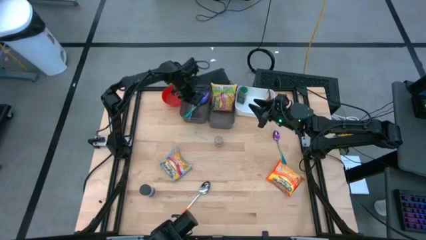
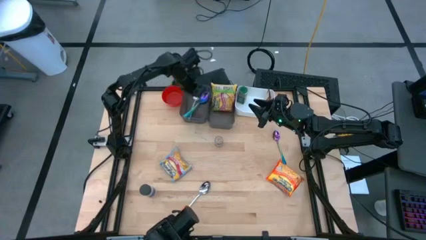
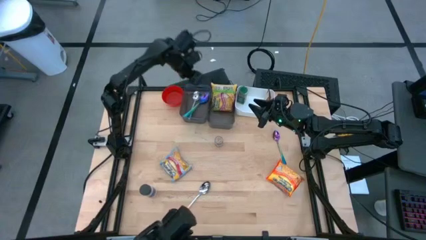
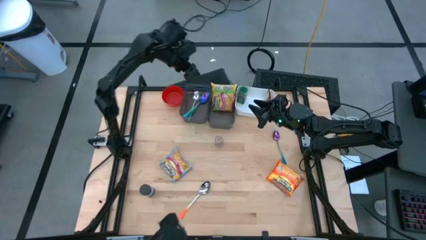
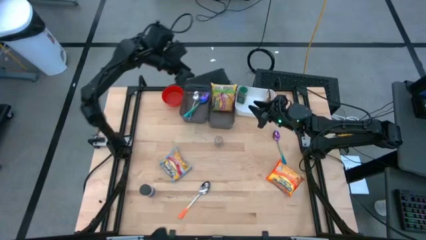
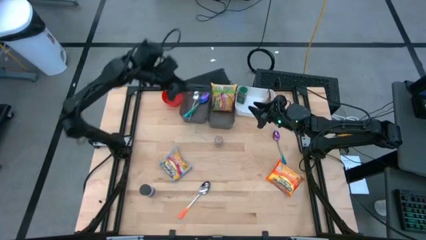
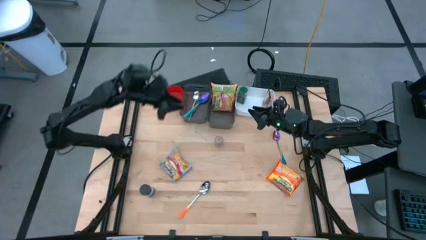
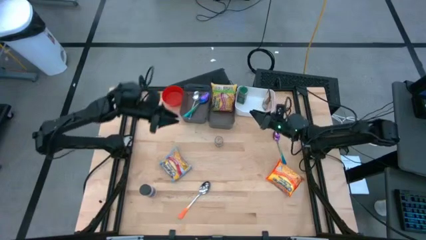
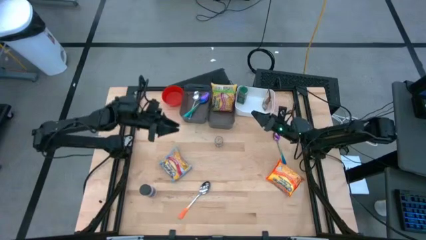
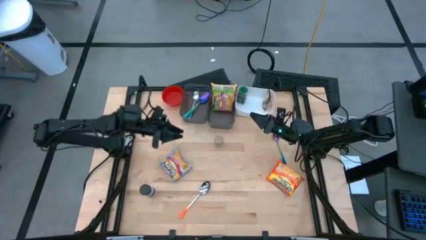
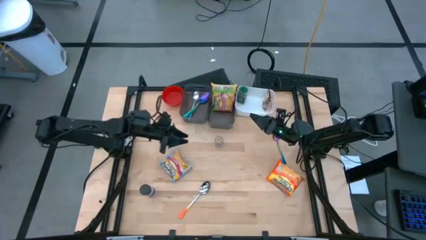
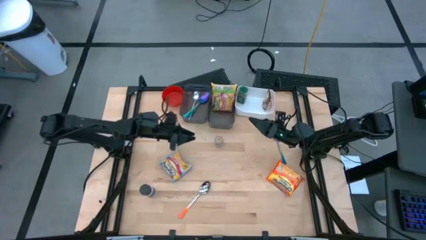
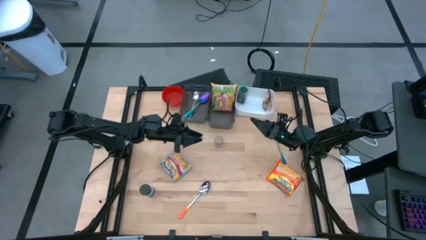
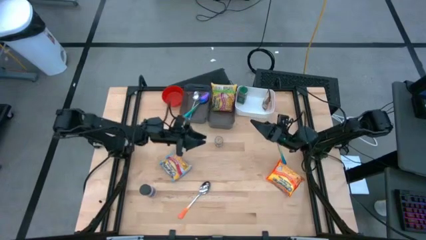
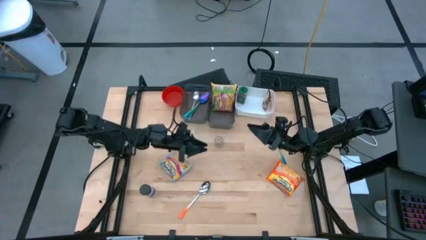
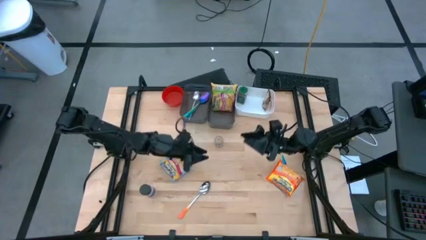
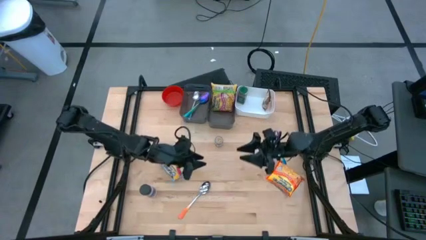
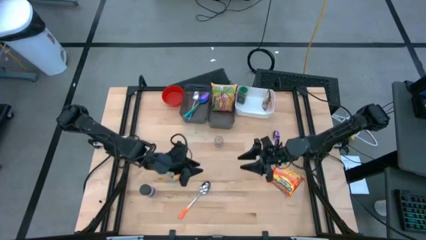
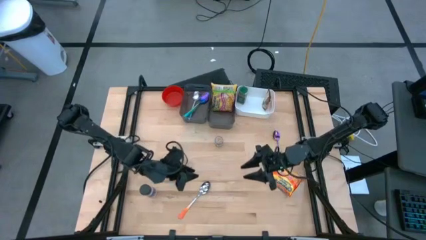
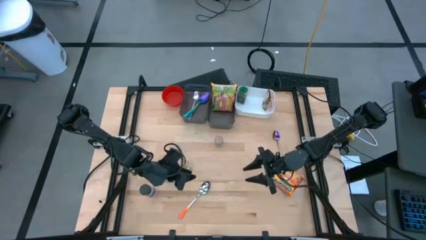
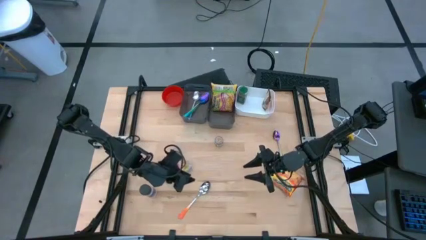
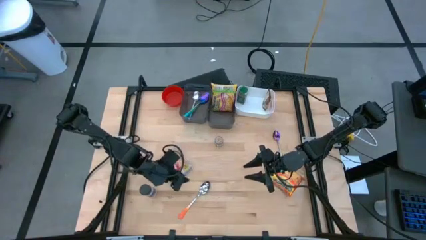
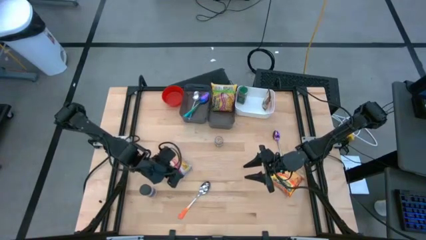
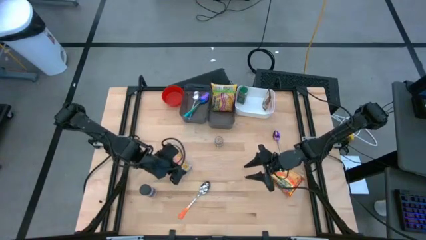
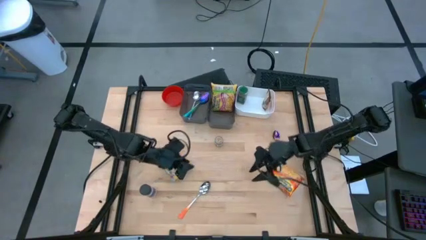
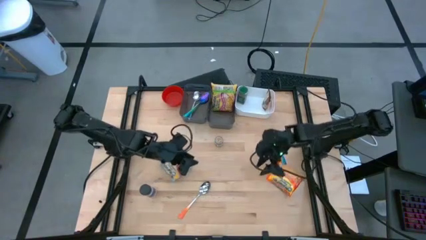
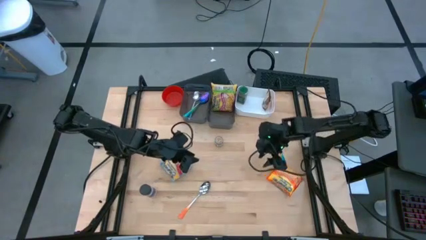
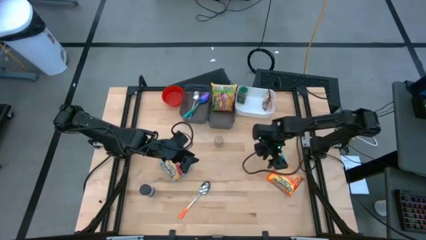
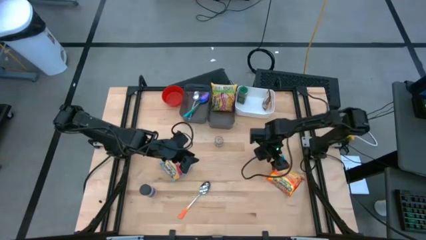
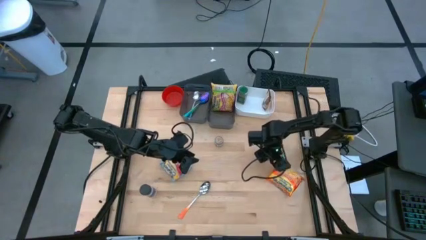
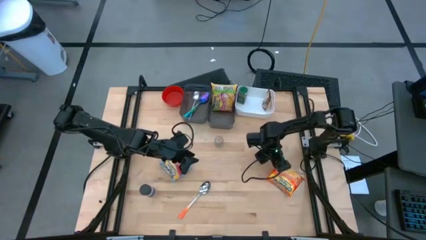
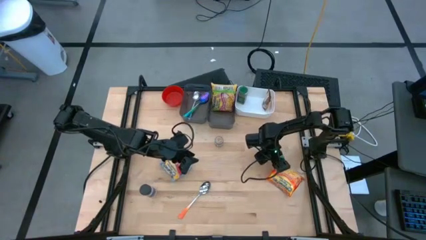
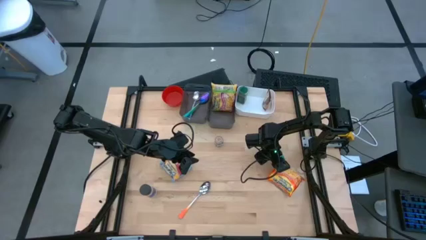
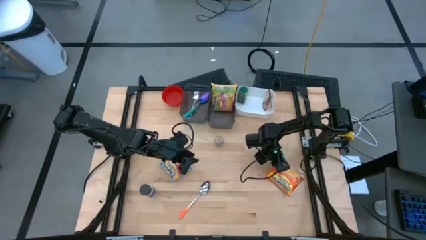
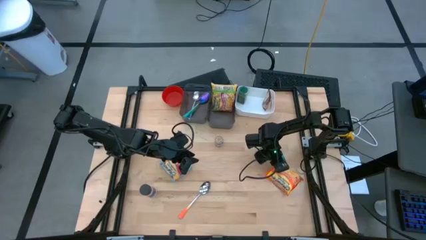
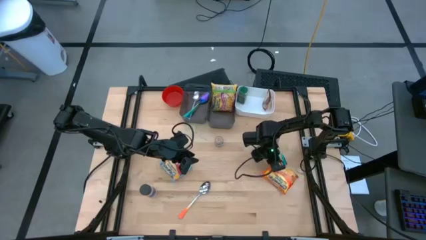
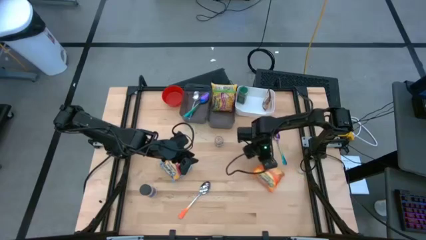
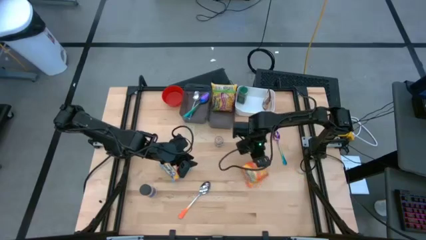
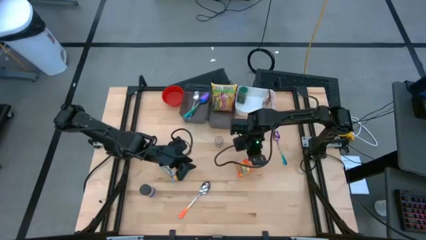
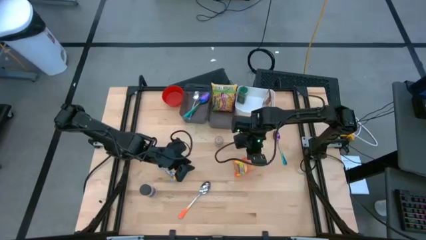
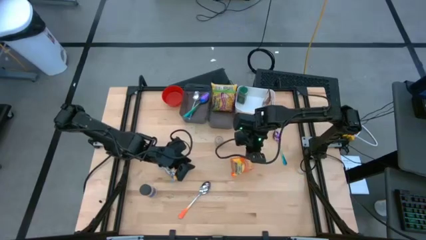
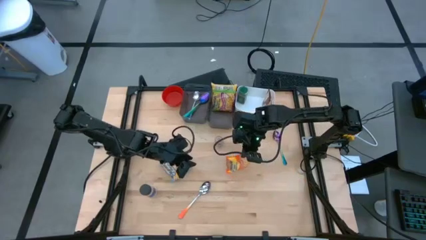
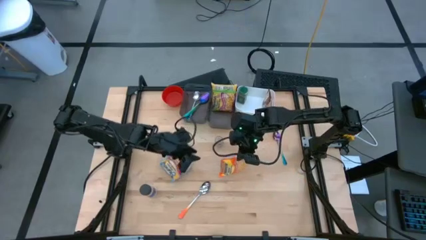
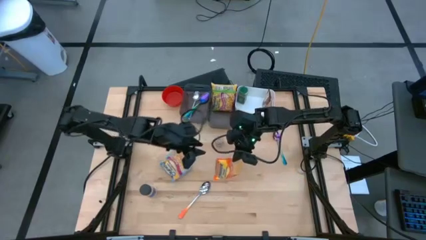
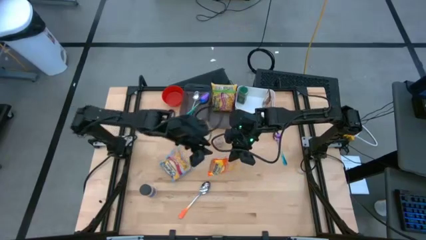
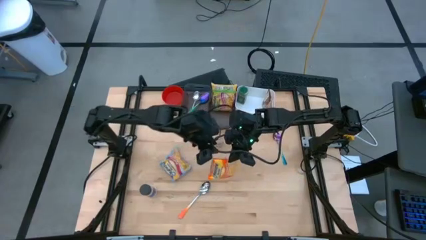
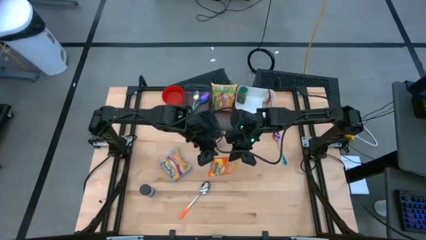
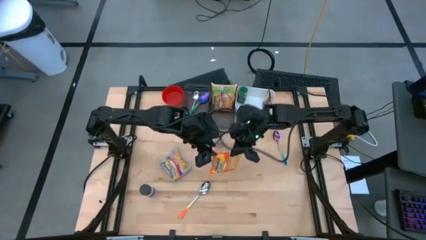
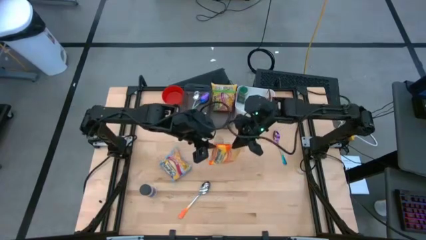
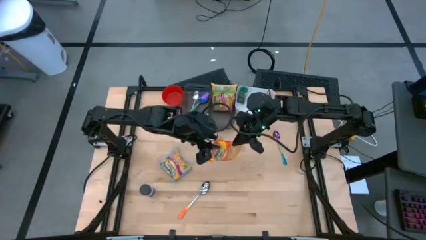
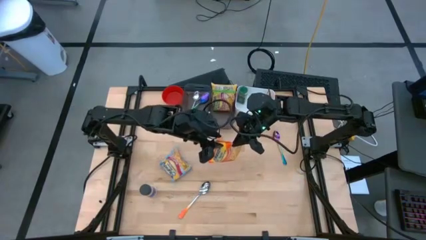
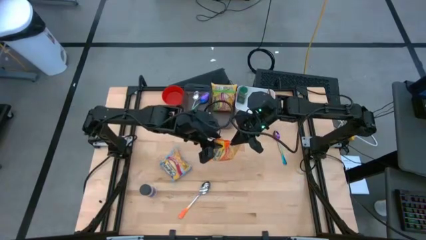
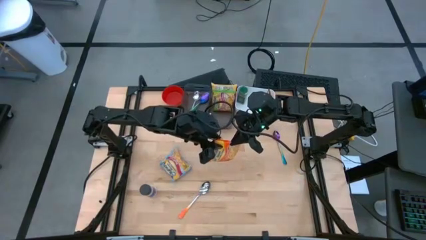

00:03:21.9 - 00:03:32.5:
Task: Pick & Place Food Item
Put the orange noodle pack into the right black bin

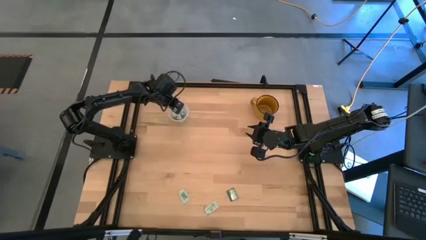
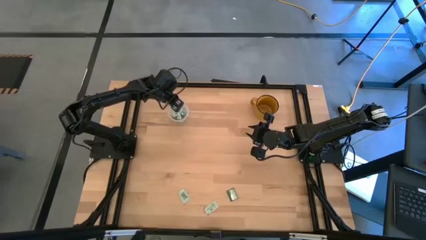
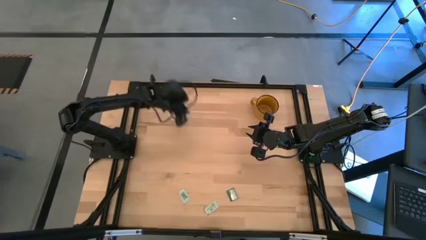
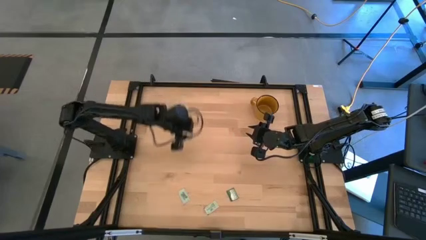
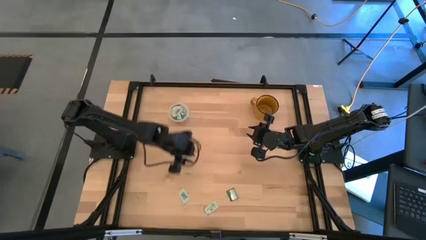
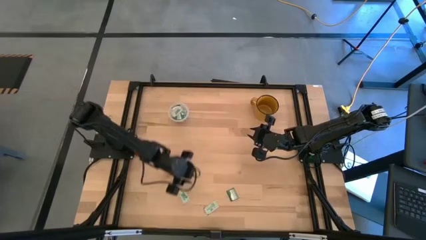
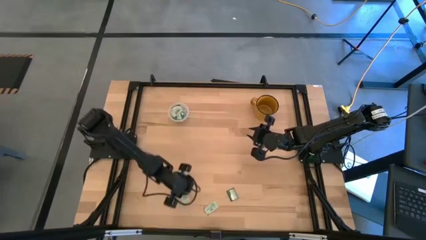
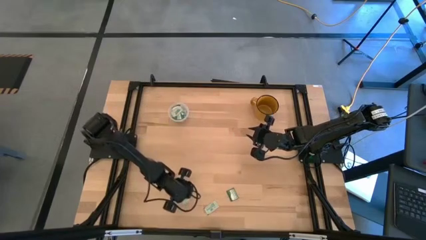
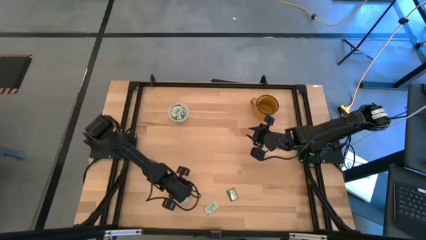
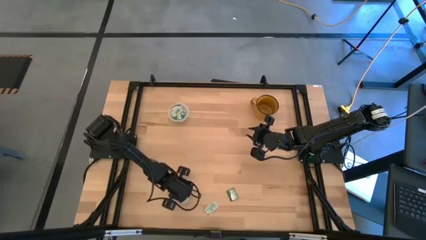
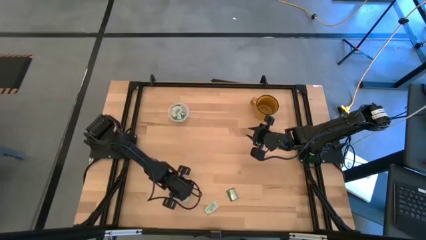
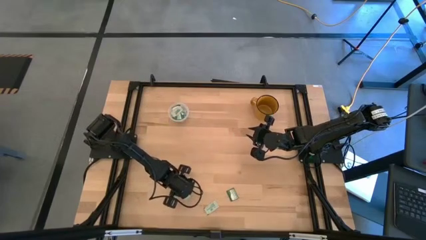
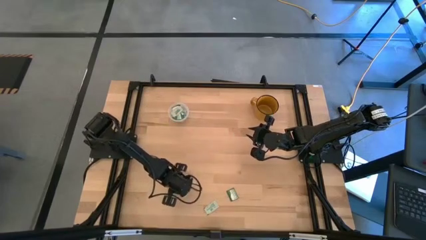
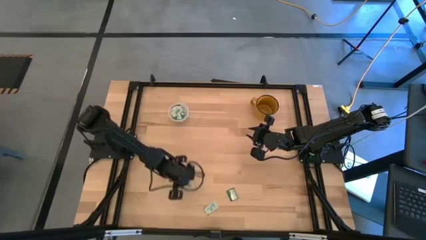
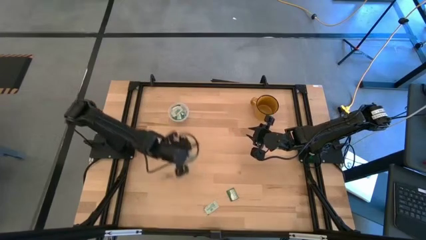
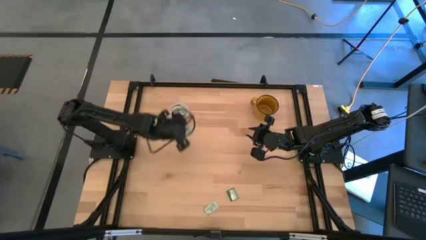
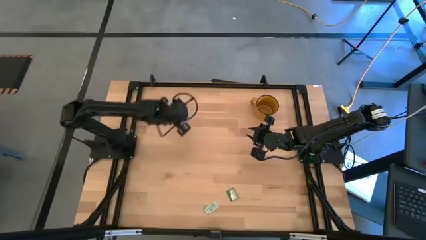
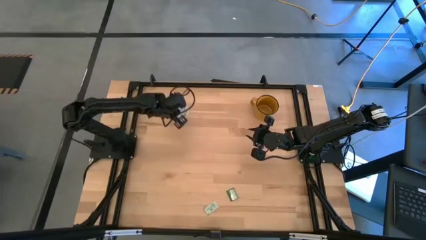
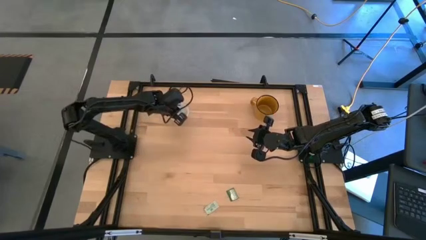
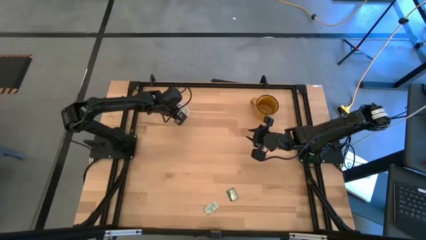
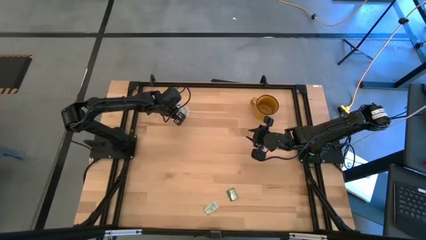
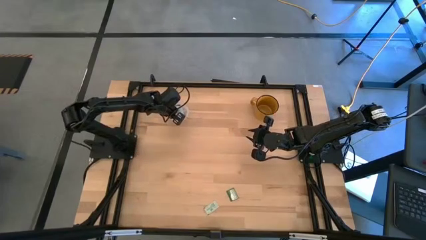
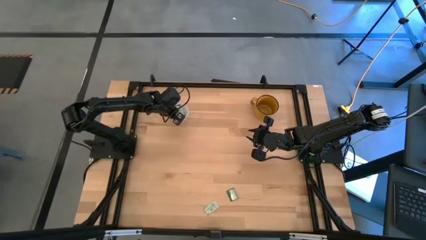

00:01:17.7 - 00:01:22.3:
Task: Pick and place Stevia / Truvia into bins
Put the stevia packet into the transparent container
